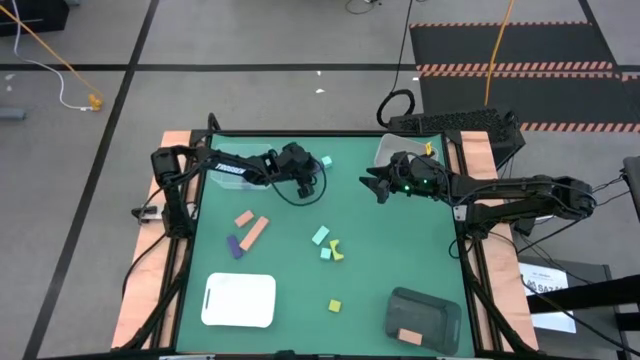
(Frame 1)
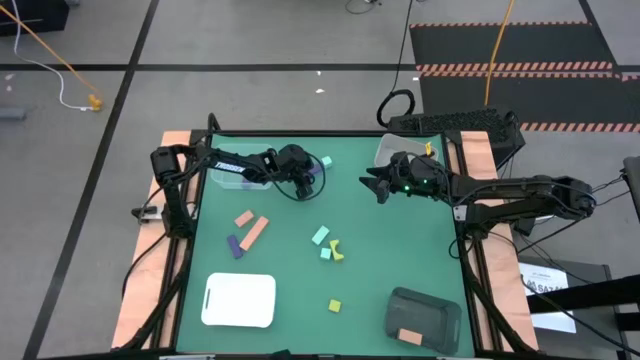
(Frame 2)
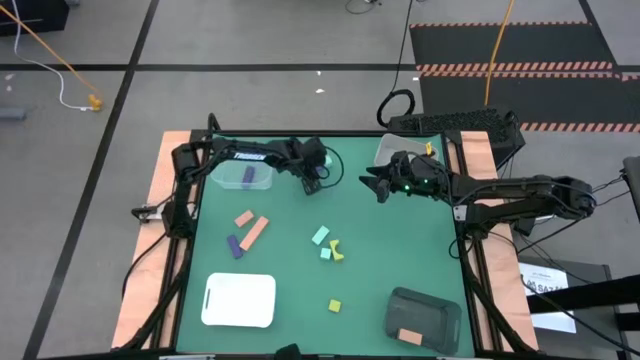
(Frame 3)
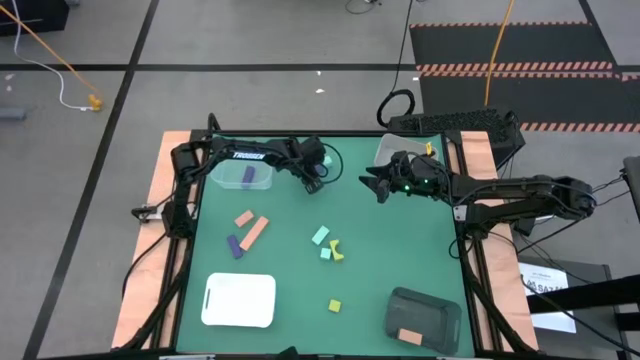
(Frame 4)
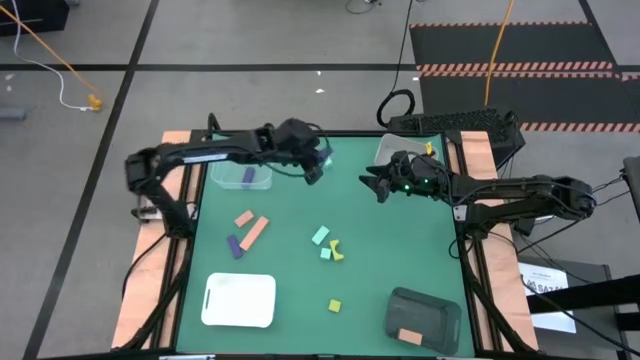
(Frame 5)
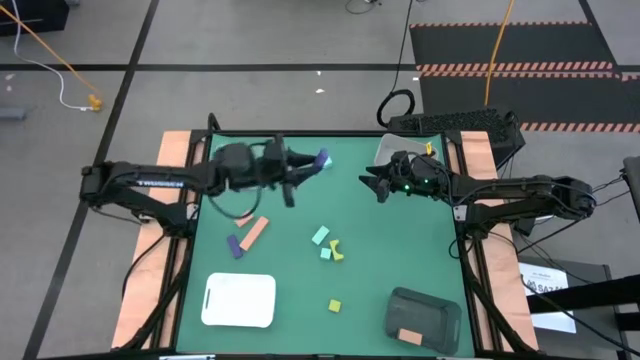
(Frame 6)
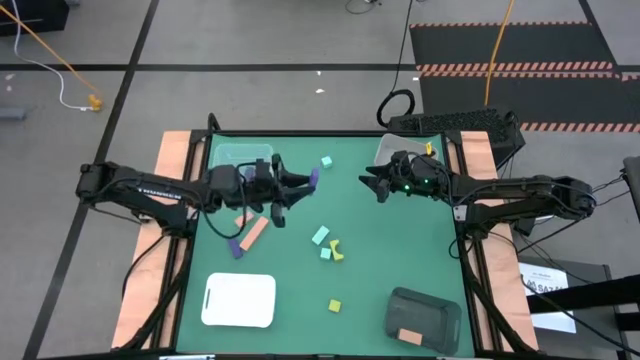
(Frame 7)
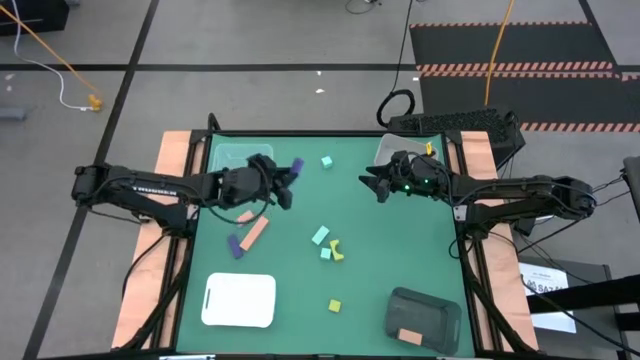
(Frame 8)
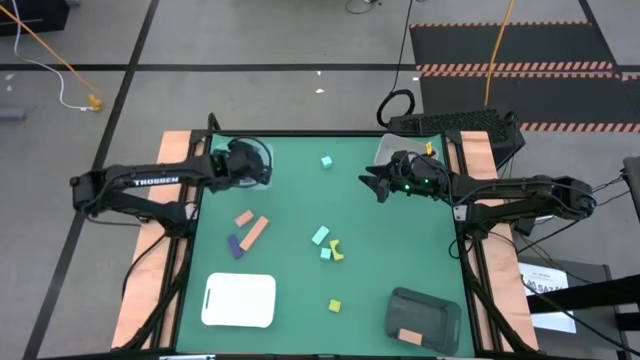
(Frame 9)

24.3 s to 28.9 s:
Task: Sort & place blocks by color
Put the top violet block into the transparent bin

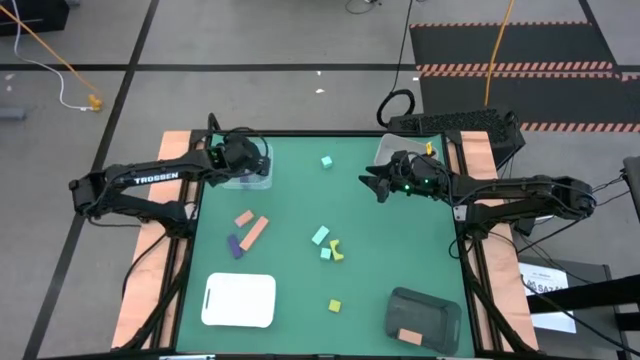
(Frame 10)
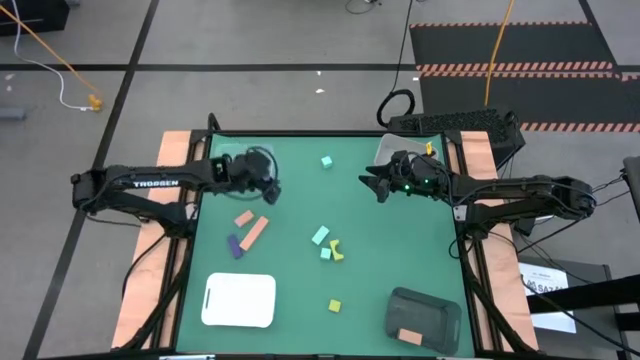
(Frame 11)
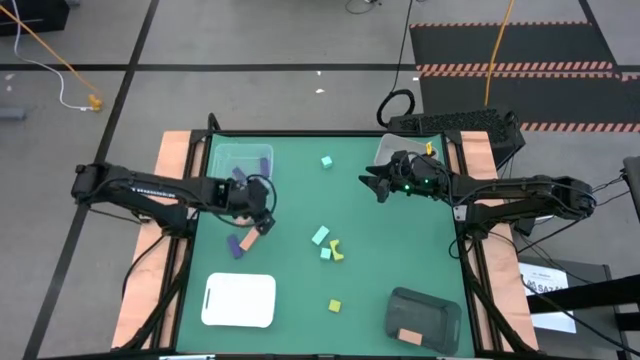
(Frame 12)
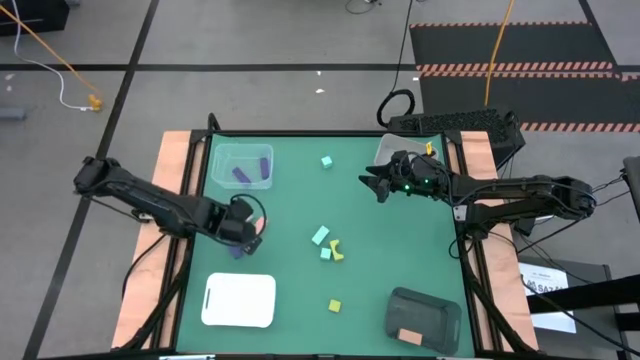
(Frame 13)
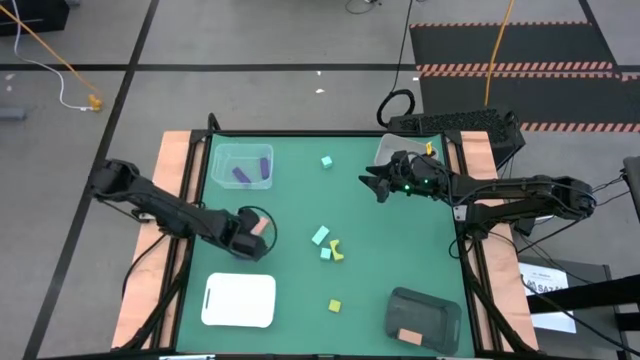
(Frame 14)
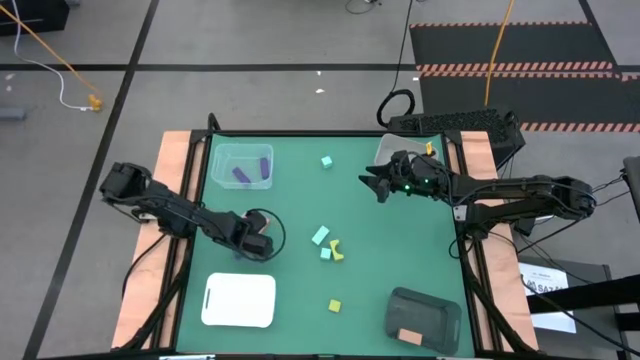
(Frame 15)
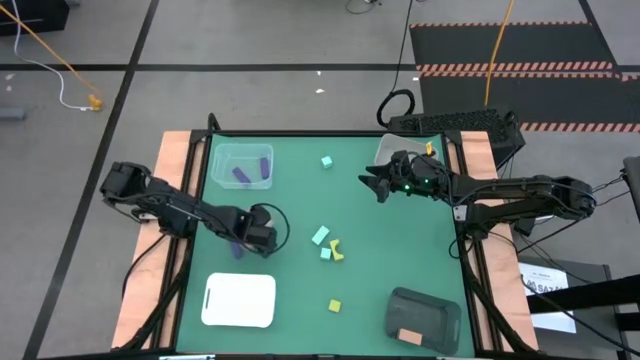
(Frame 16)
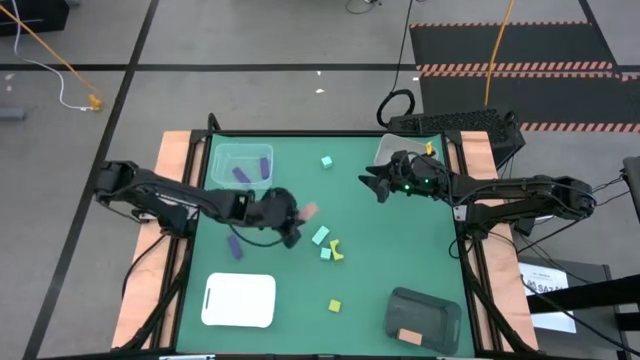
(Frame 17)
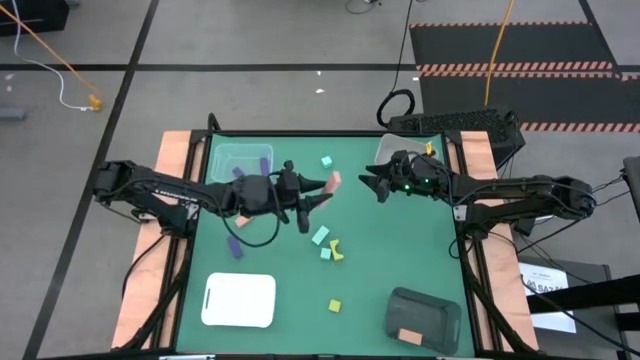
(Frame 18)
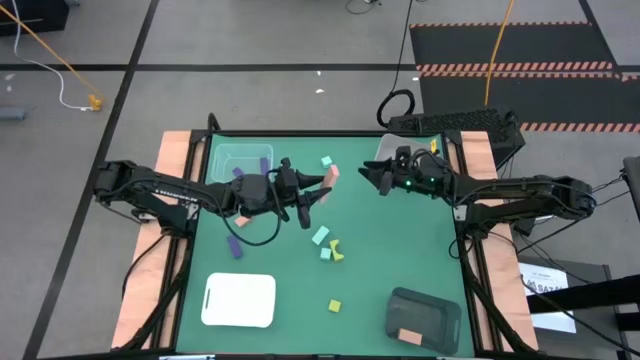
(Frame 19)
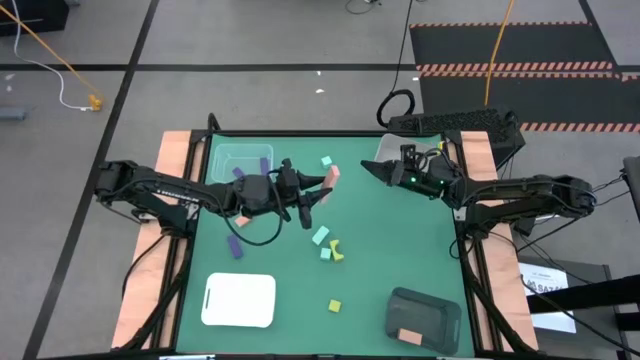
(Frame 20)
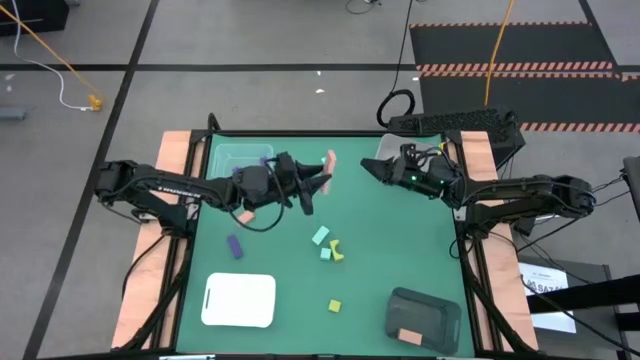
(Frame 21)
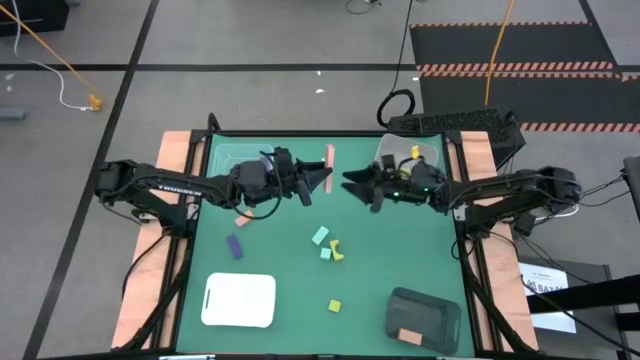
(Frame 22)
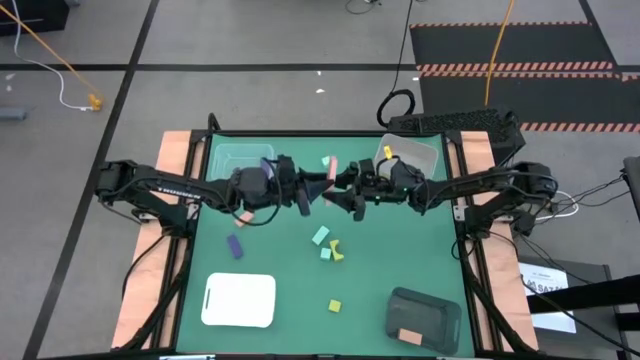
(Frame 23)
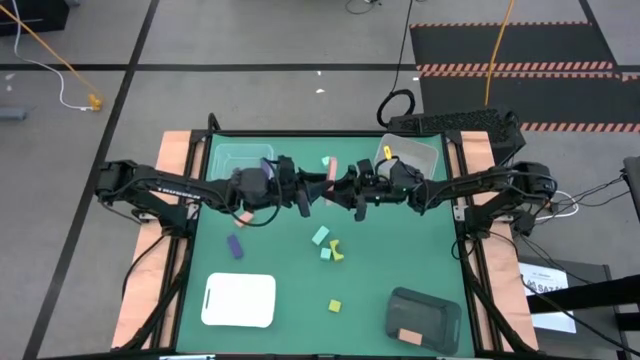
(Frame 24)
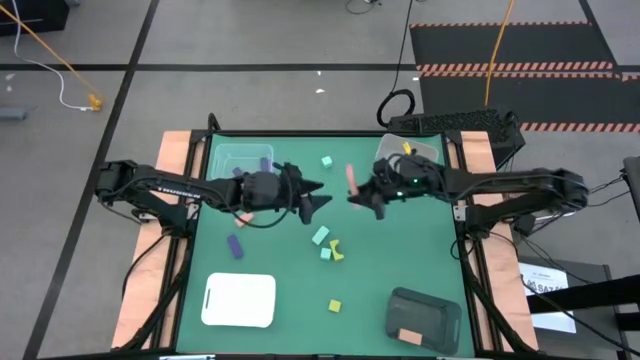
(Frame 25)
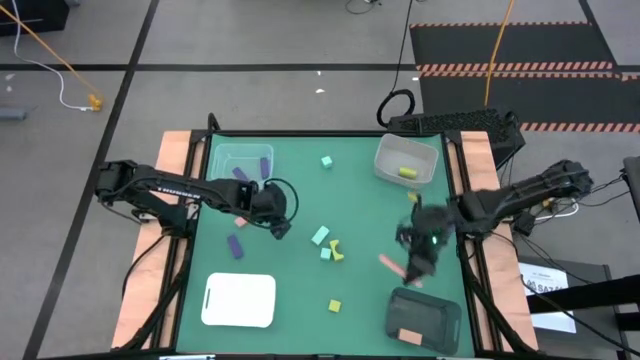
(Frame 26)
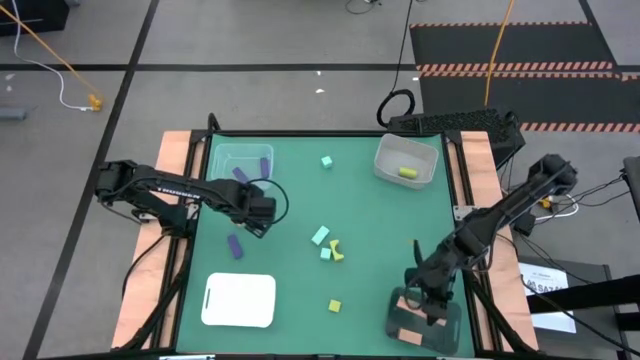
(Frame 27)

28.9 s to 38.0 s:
Put the bottom light orange block into the black bin

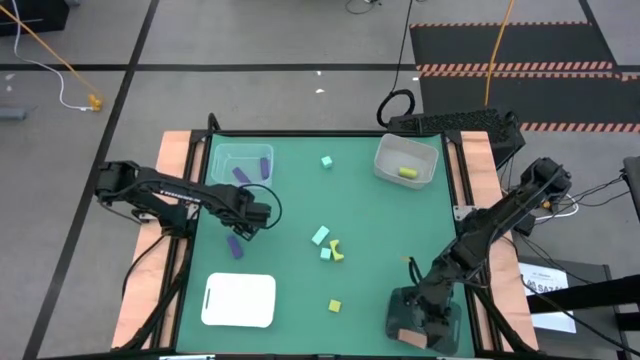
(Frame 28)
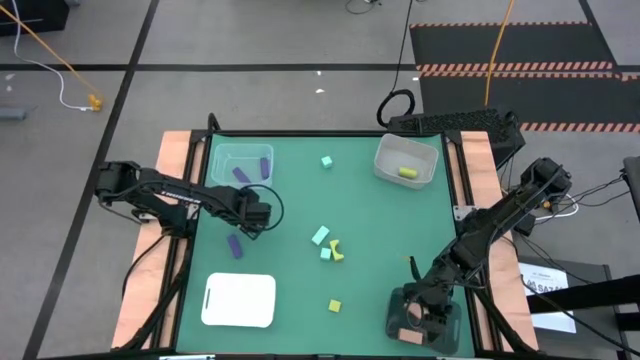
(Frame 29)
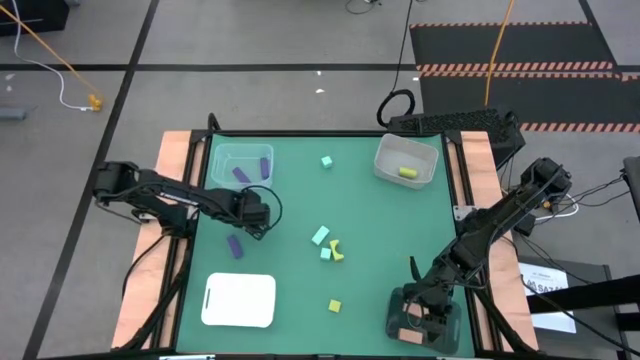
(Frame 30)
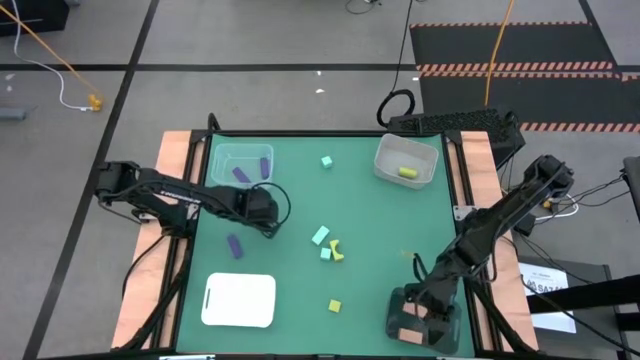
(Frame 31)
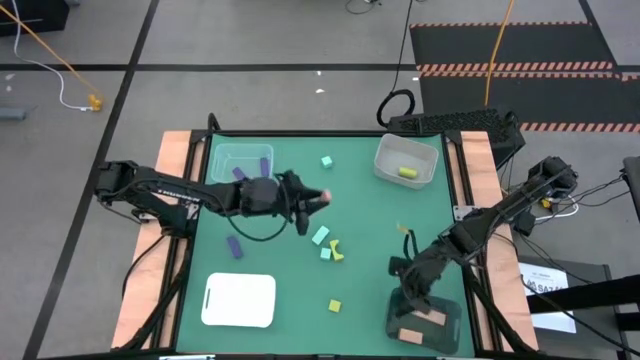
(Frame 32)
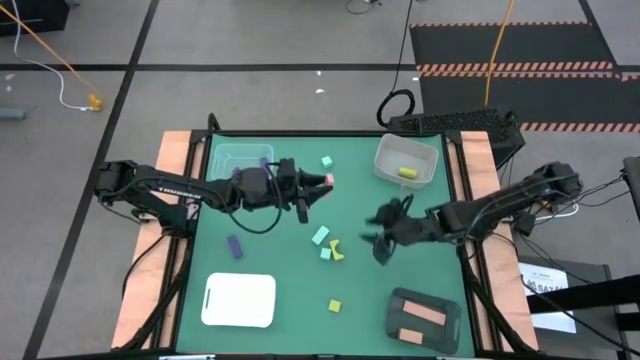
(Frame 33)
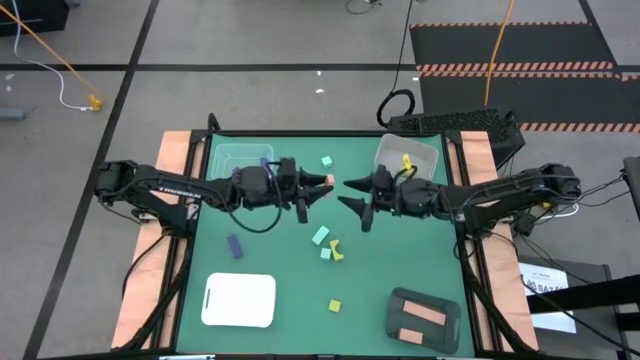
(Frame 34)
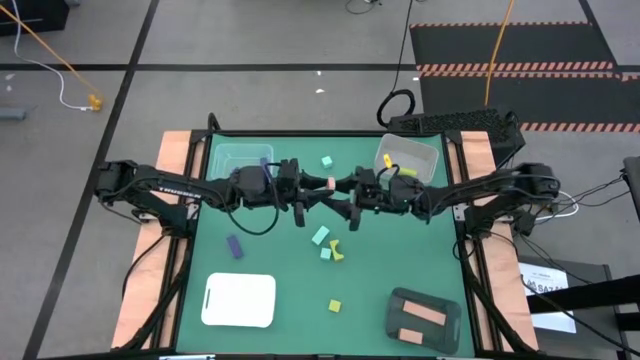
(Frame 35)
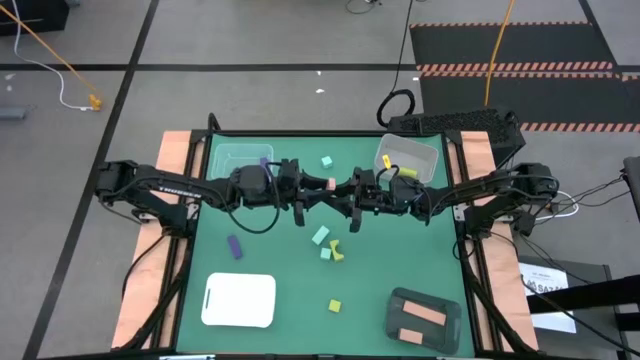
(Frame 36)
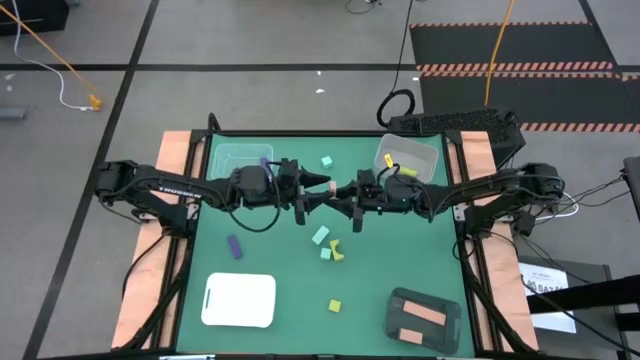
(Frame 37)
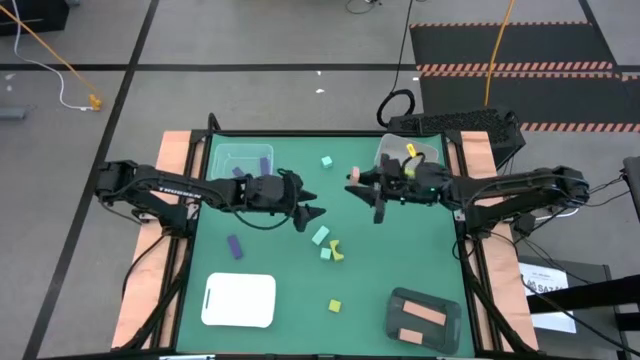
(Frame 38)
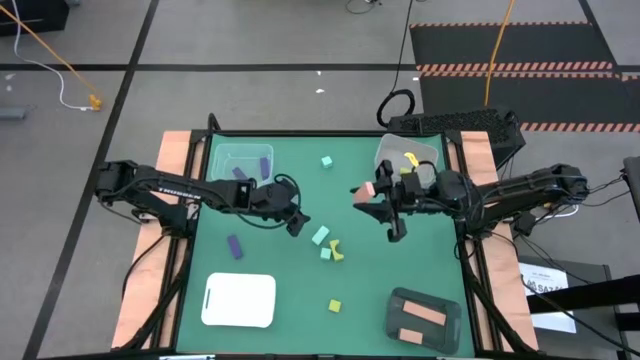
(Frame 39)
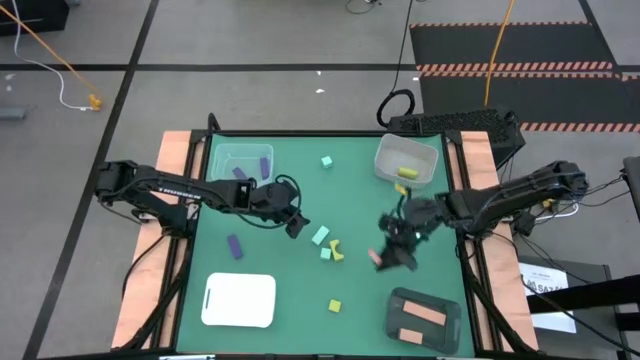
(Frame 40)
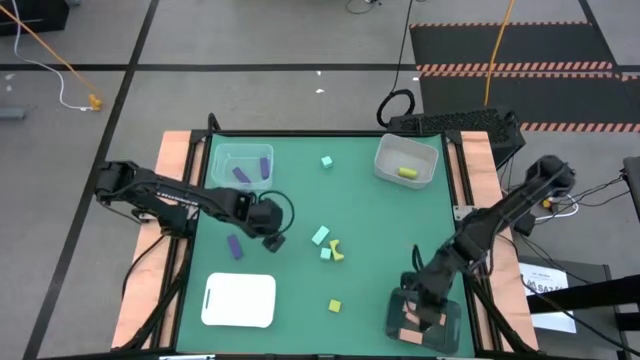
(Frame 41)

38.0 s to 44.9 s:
Put the light orange block into the black bin

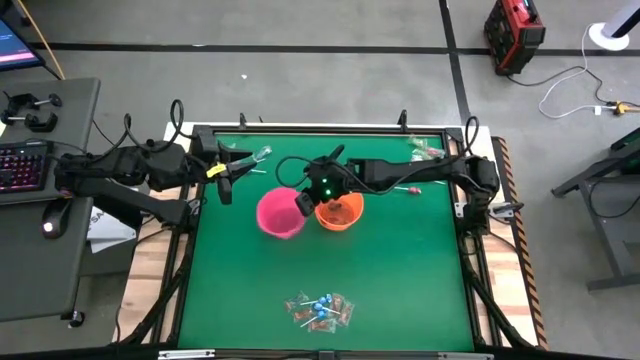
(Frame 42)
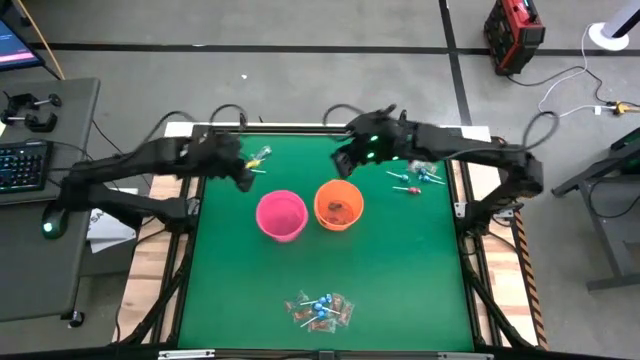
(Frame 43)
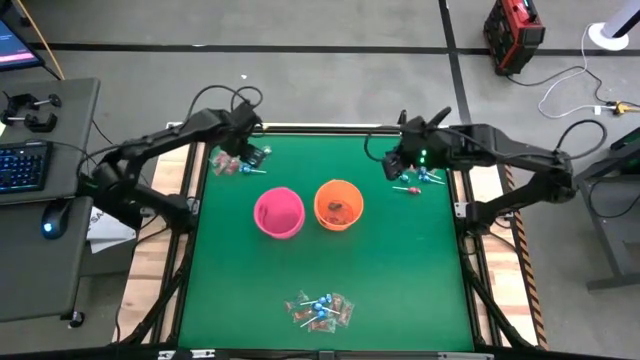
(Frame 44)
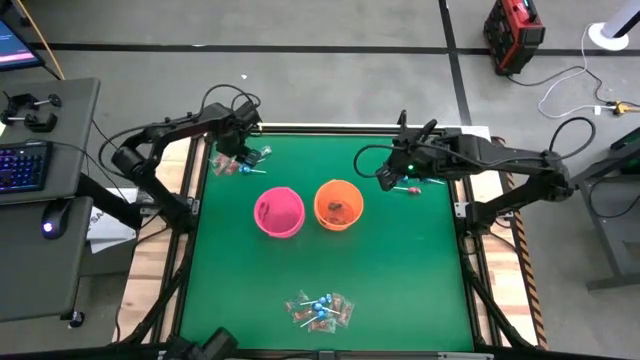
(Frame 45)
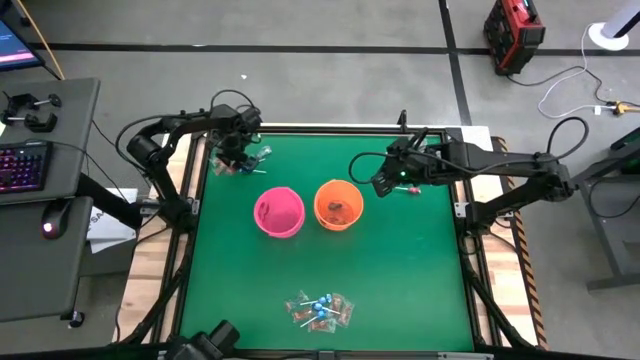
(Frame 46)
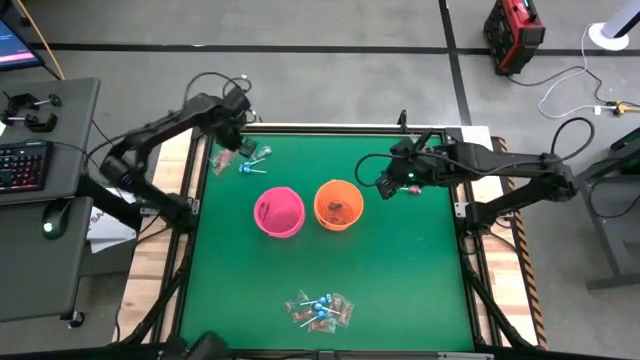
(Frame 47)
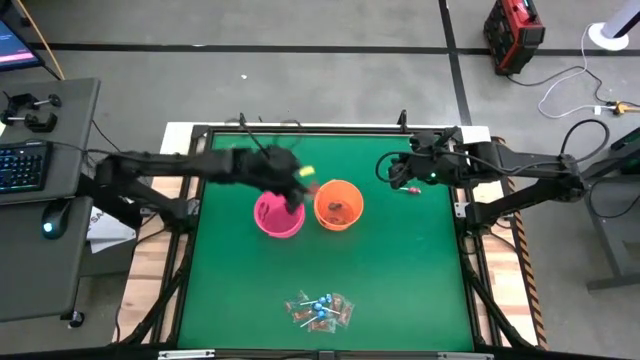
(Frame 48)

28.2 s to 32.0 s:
Task: Sort candy by brand, put in halloween buckets
Put the orange gummy into the orange bucket
